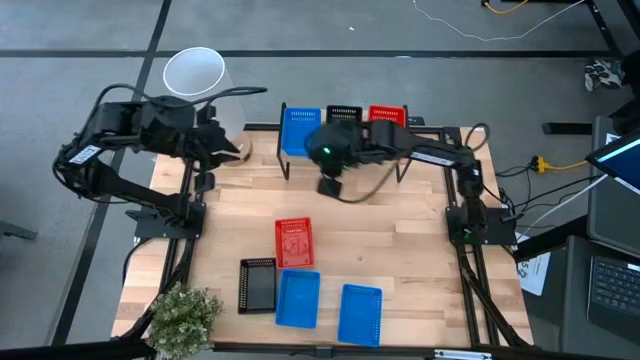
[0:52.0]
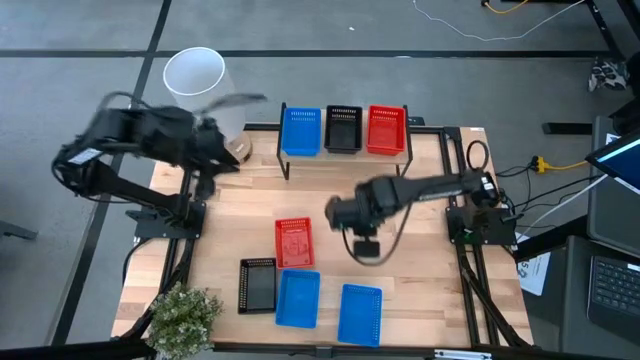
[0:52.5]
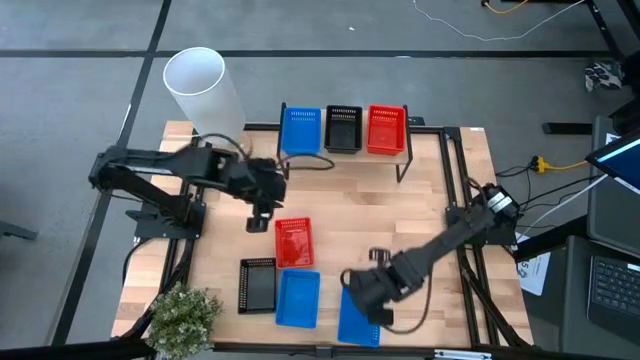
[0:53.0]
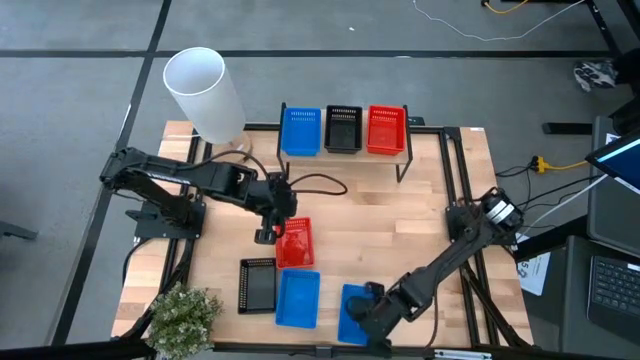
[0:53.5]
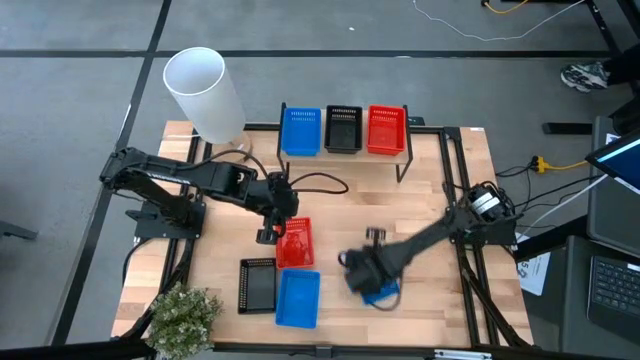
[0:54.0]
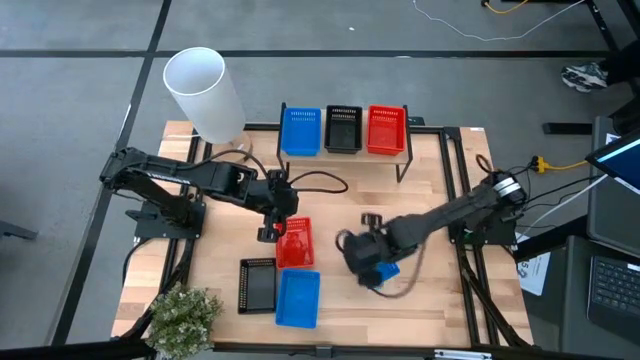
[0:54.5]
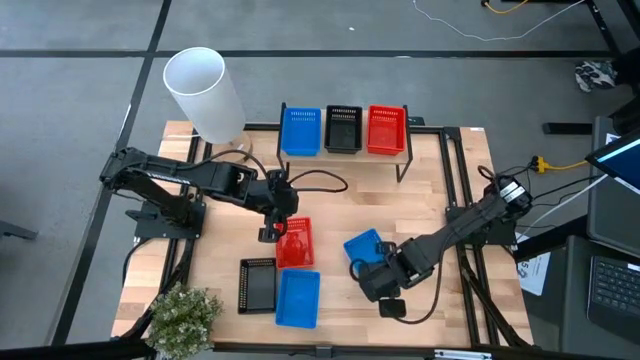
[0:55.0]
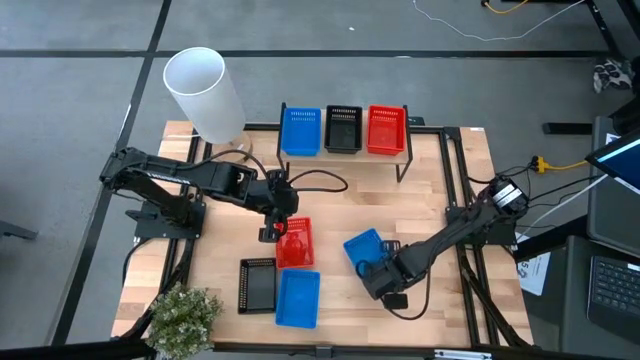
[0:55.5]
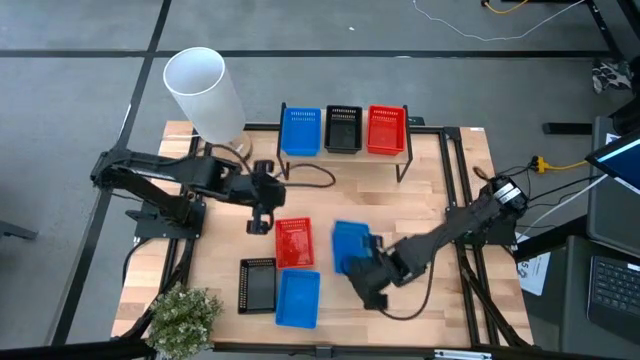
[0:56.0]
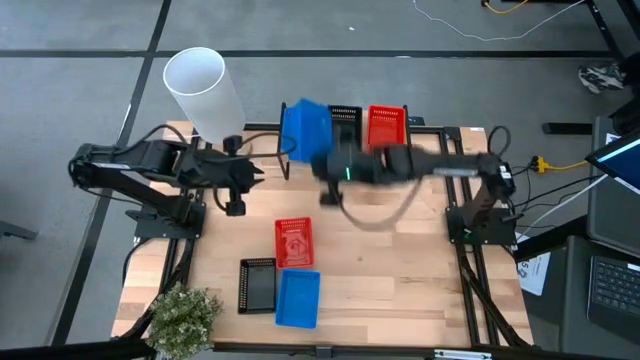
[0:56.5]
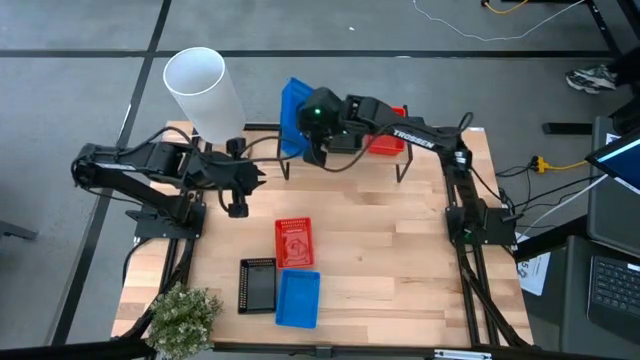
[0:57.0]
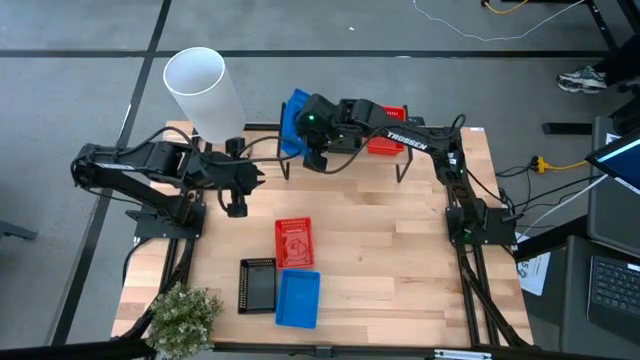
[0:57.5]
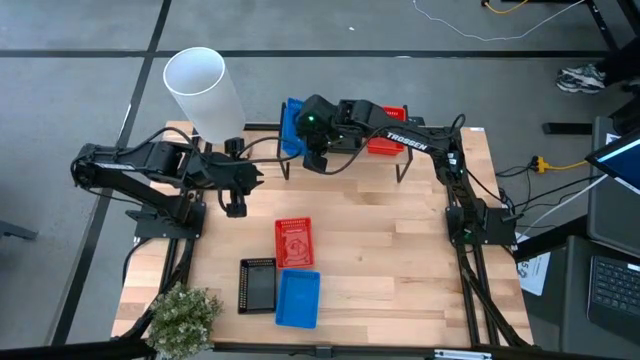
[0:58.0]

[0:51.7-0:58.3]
Task: Stack baskets on shelf by color
Stack the right blue bin on top of the other blue bin on the shelf

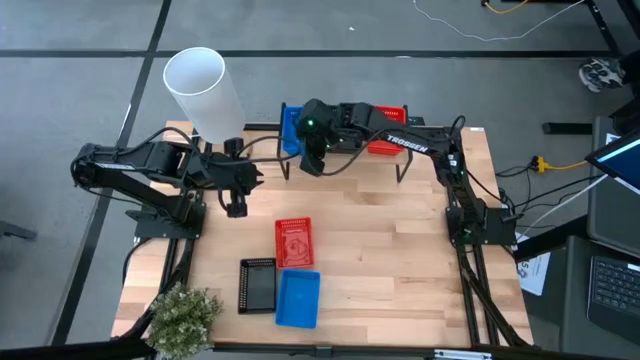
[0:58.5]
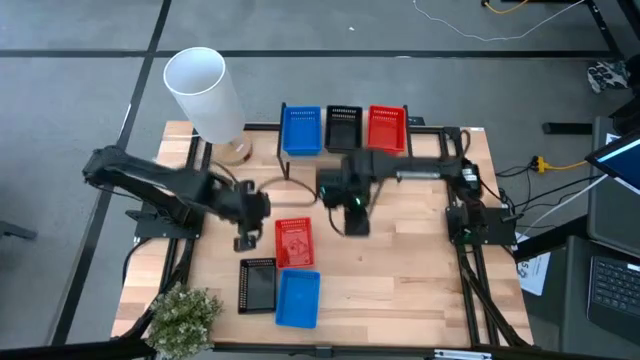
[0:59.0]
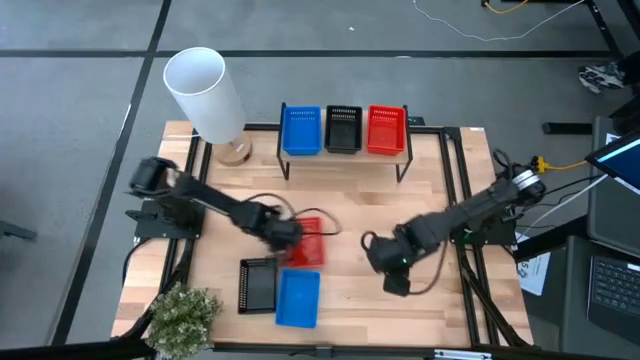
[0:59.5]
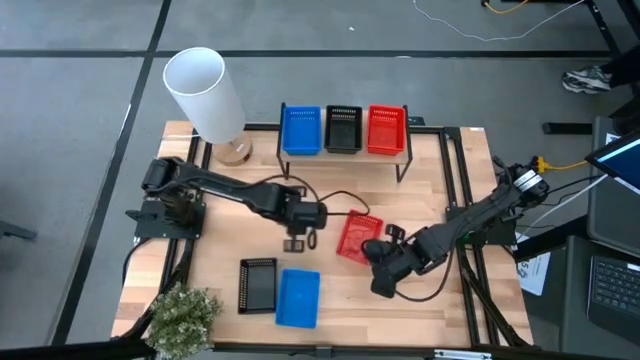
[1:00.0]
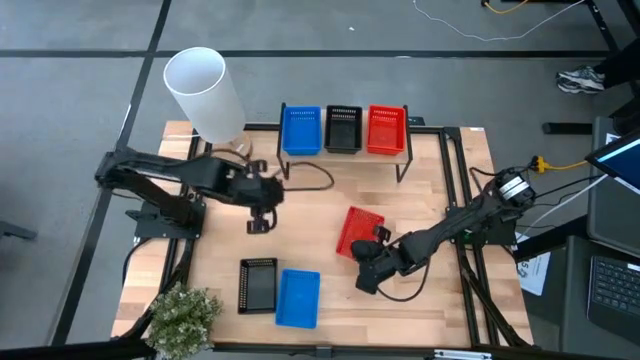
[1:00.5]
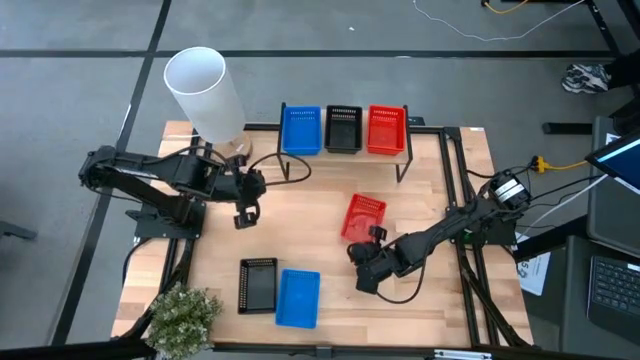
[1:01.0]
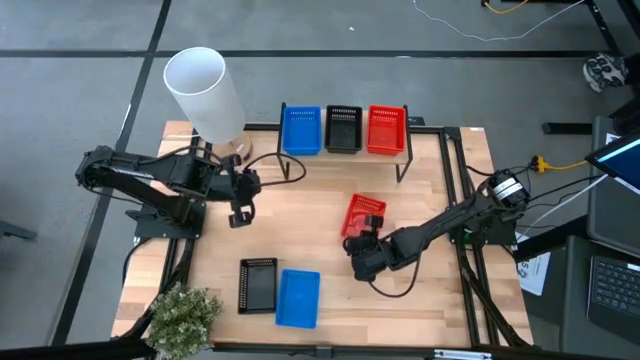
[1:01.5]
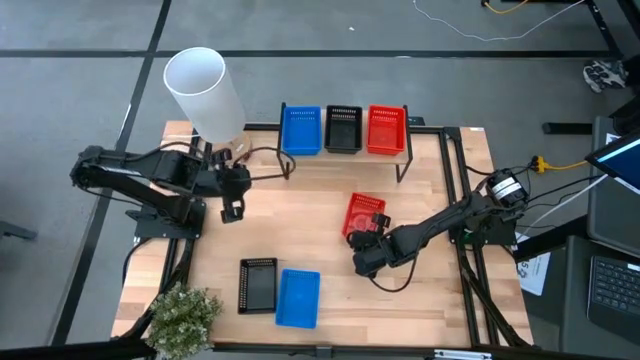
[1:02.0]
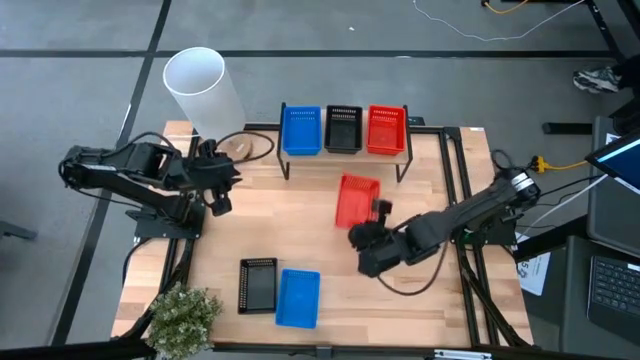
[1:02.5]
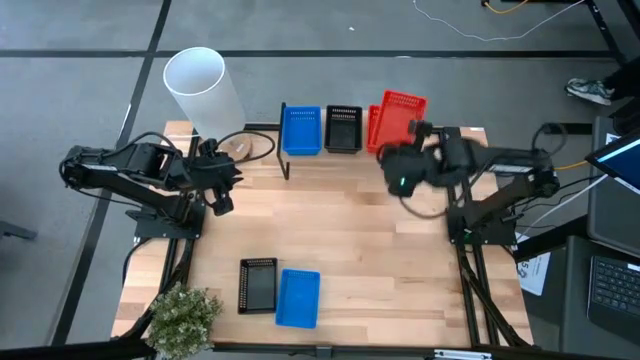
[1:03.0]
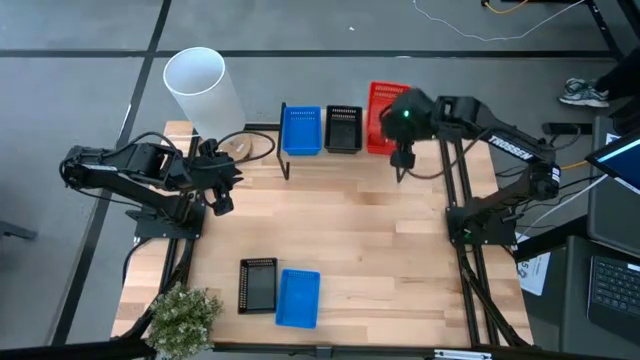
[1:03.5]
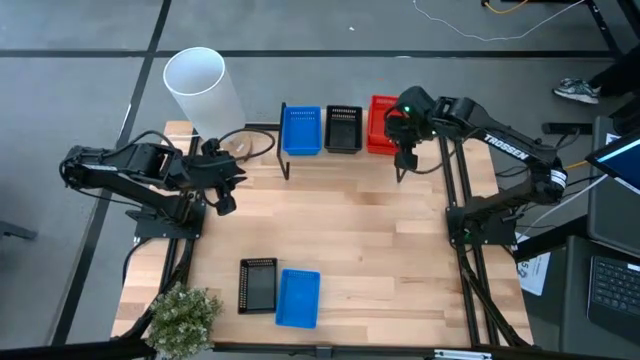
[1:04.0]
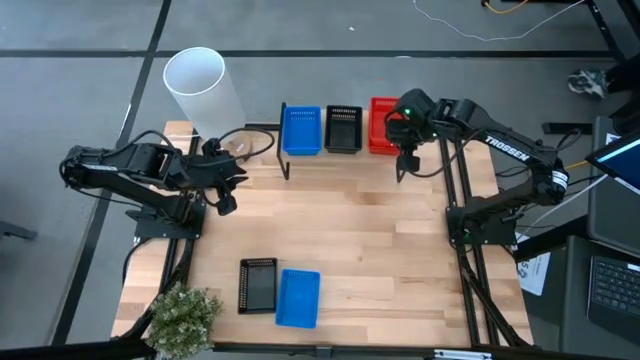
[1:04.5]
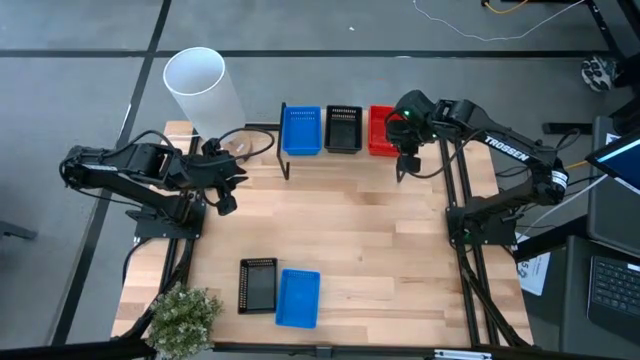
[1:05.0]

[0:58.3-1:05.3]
Stack the red bin on top of the other red bins on the shelf

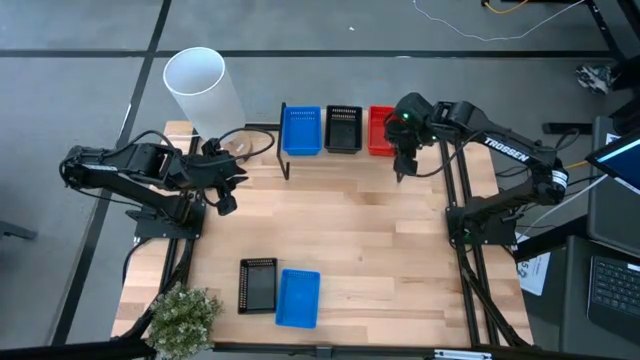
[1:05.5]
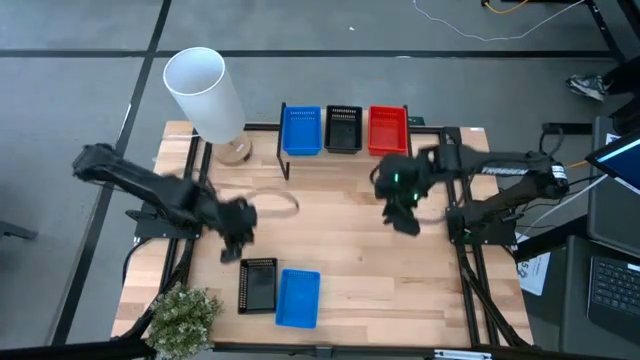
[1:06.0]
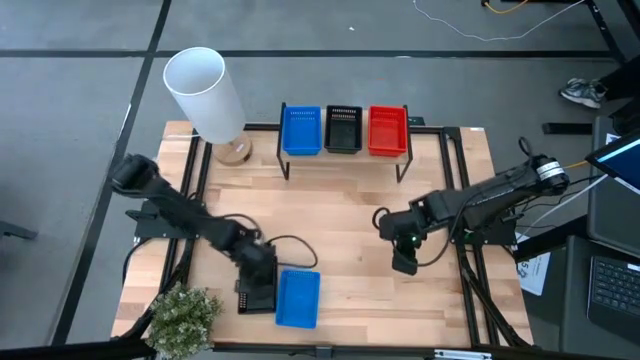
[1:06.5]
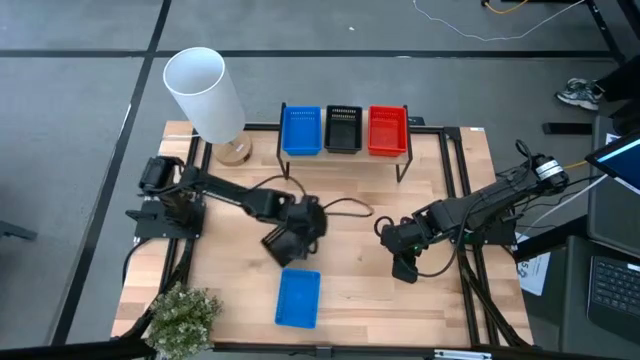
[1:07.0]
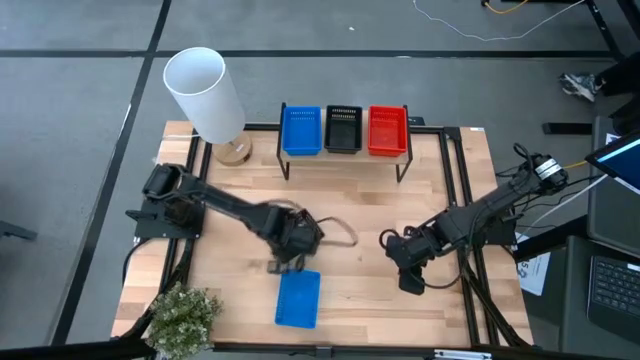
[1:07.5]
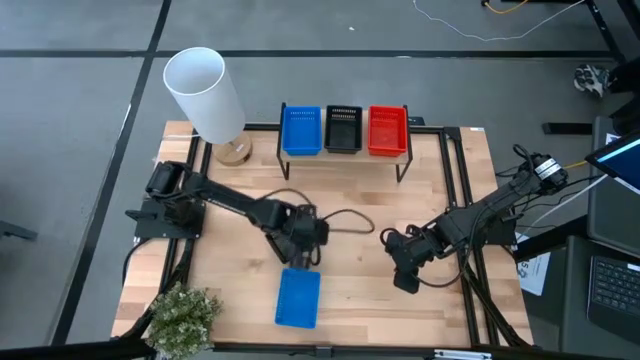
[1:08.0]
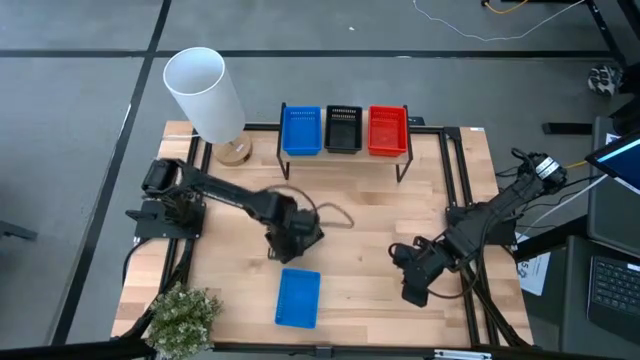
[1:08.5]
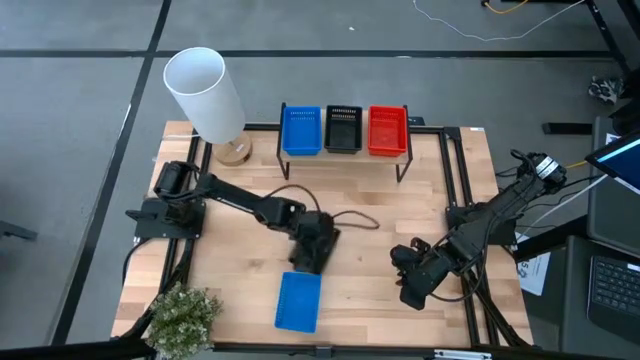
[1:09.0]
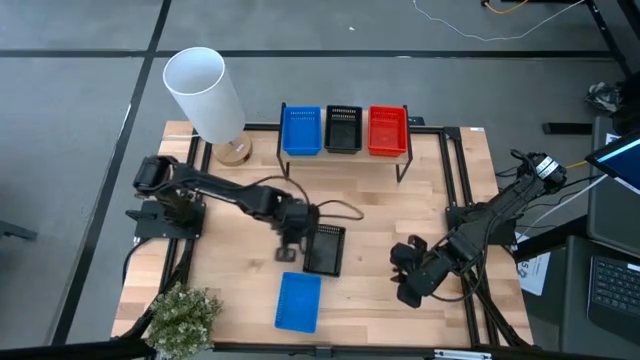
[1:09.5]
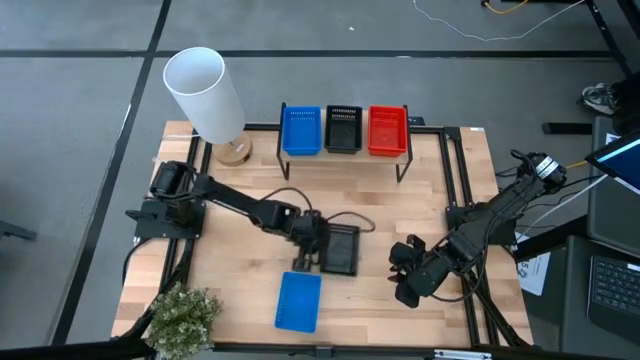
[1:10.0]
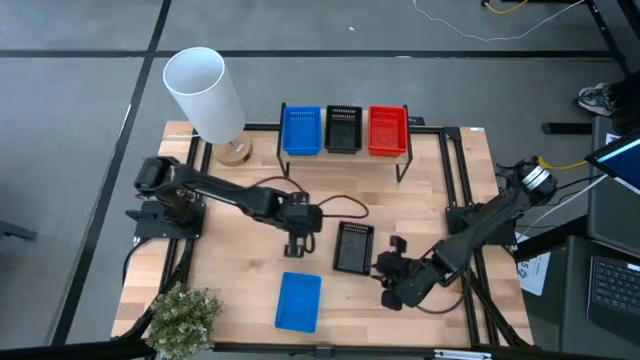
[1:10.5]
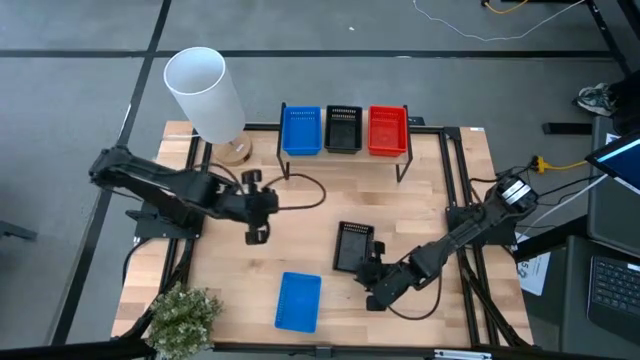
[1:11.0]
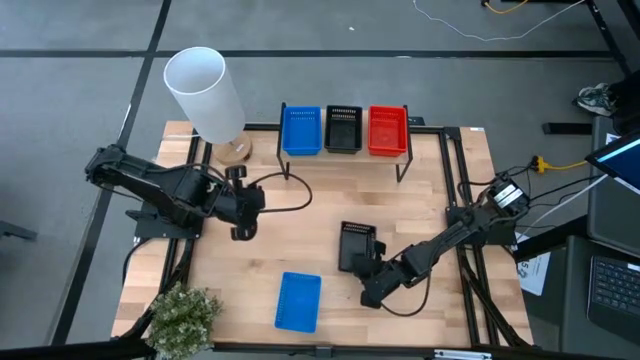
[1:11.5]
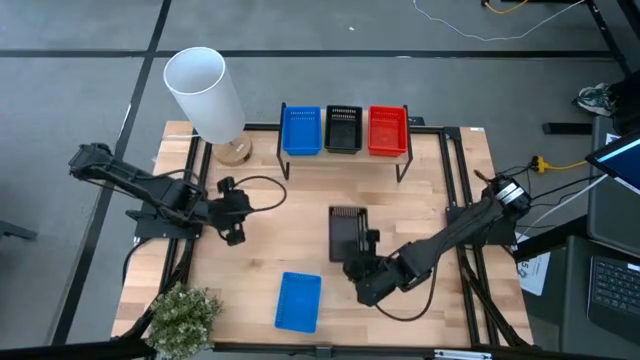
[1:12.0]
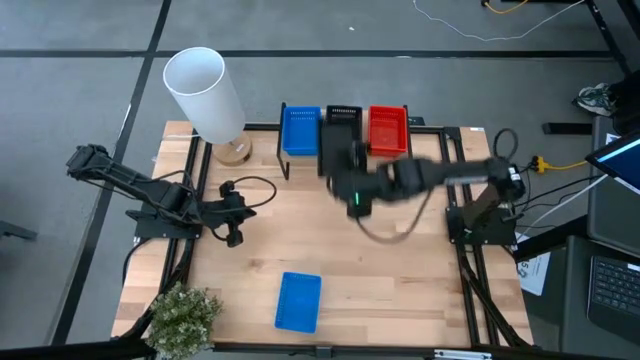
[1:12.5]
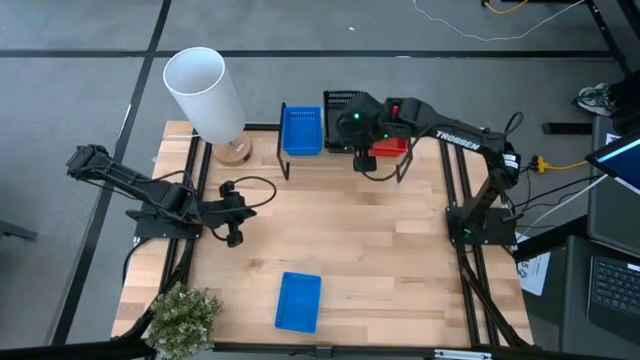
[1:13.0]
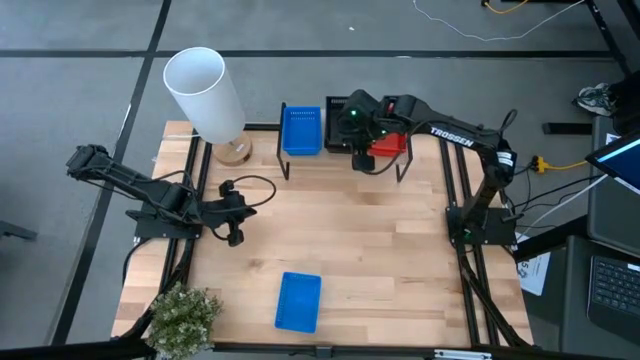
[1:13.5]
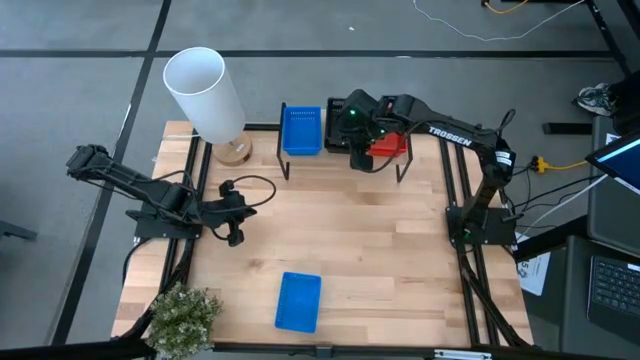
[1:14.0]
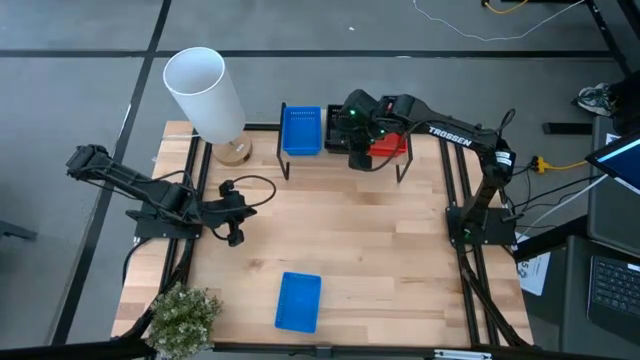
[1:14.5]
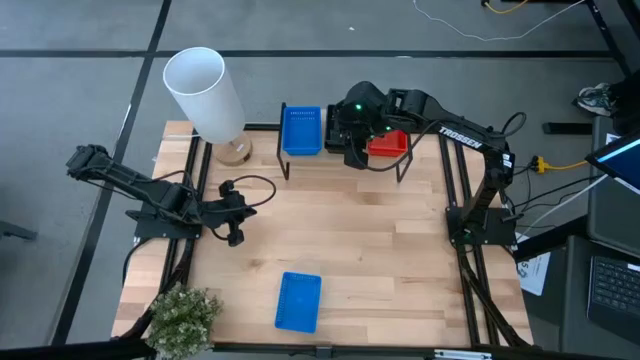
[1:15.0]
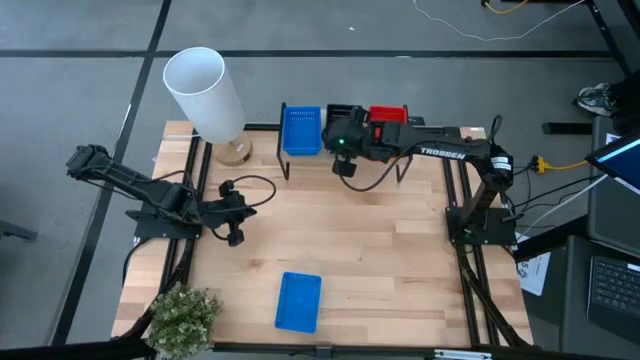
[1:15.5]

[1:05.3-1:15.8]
Stack the black bin on top of the other black bins on the shelf
